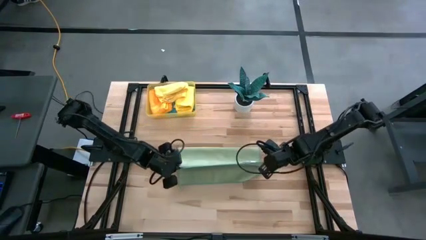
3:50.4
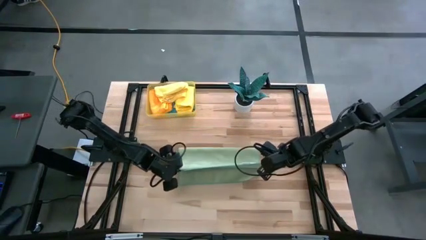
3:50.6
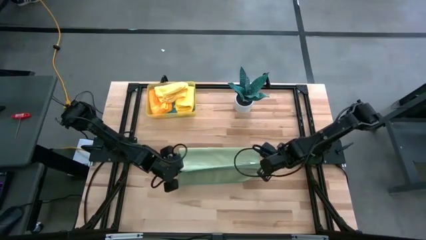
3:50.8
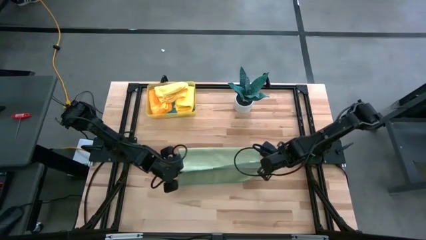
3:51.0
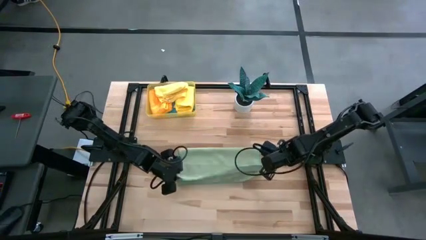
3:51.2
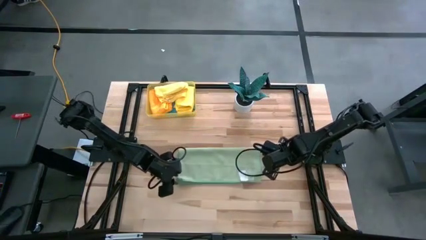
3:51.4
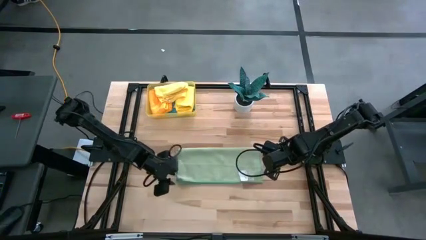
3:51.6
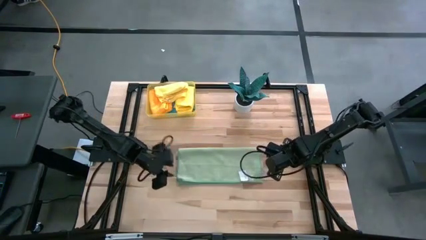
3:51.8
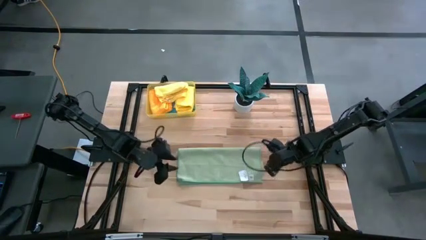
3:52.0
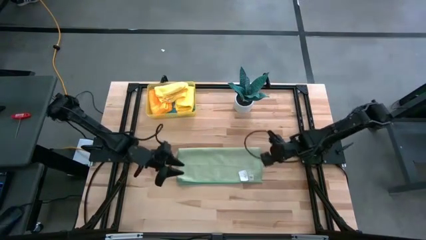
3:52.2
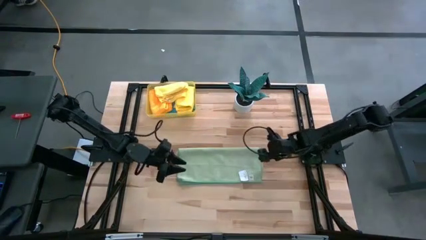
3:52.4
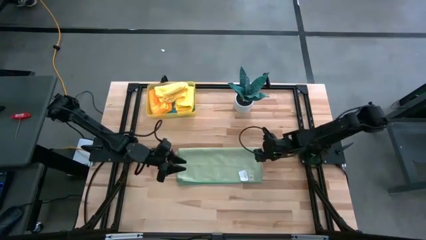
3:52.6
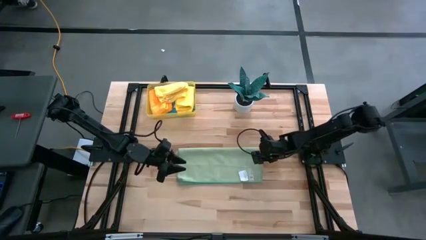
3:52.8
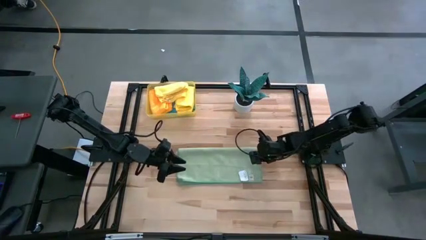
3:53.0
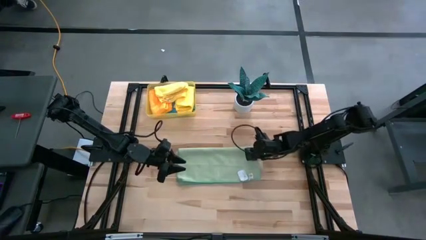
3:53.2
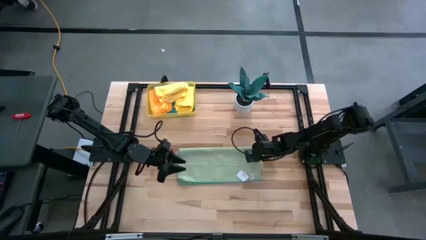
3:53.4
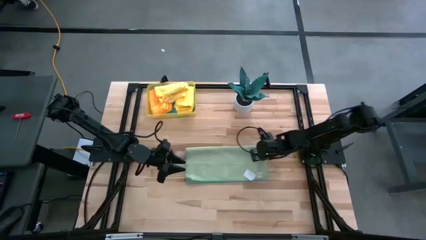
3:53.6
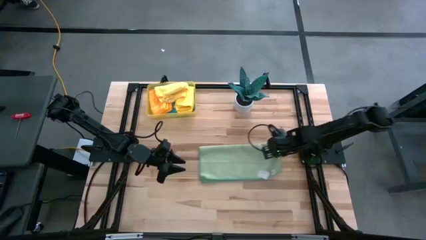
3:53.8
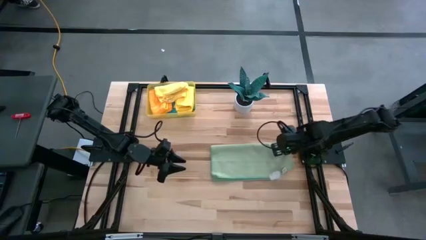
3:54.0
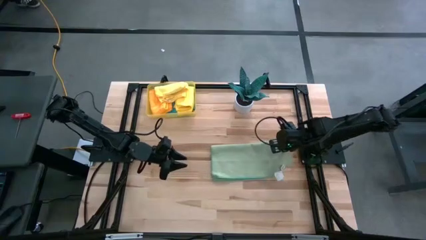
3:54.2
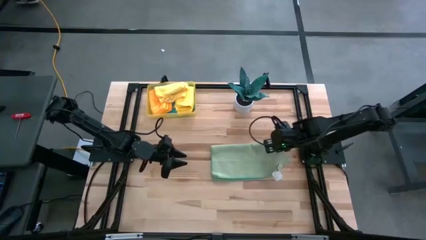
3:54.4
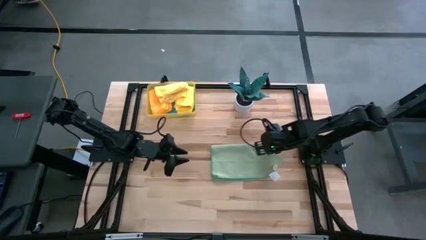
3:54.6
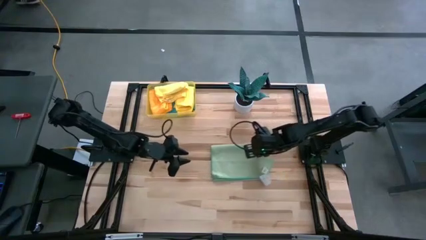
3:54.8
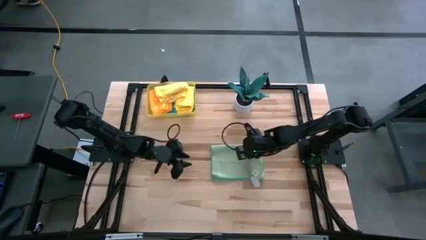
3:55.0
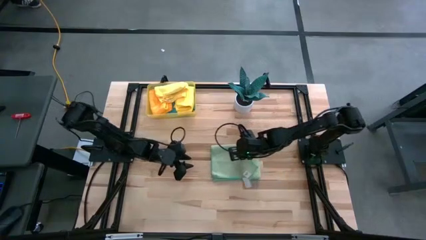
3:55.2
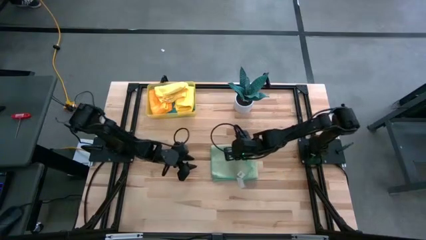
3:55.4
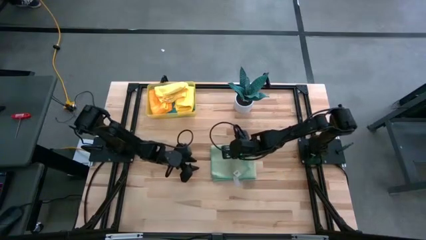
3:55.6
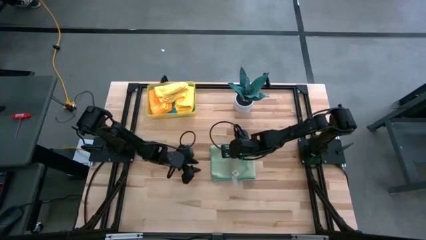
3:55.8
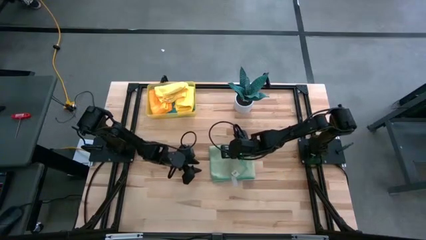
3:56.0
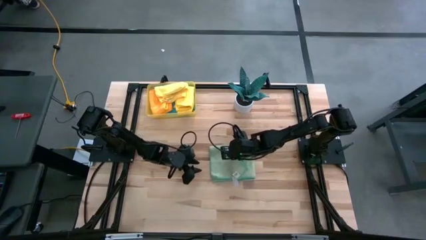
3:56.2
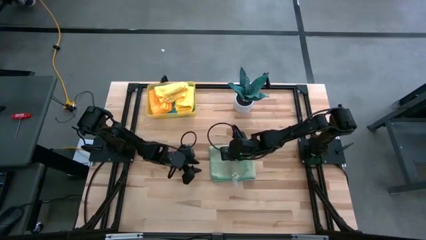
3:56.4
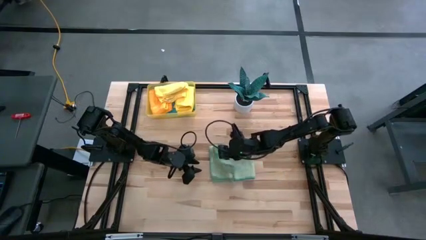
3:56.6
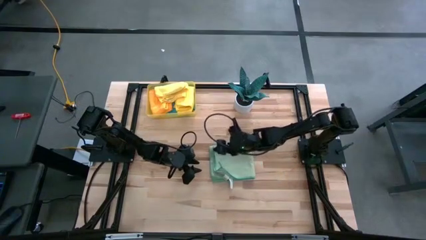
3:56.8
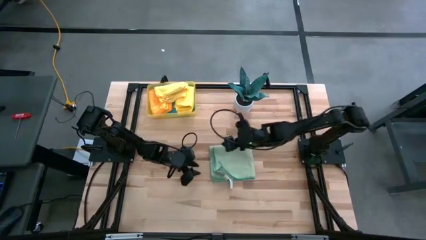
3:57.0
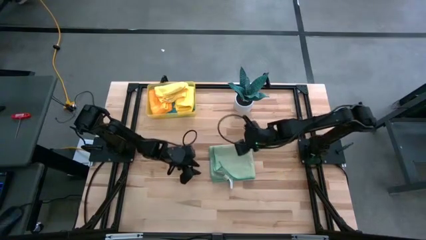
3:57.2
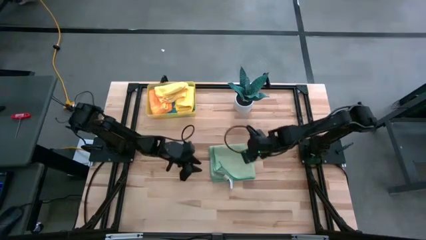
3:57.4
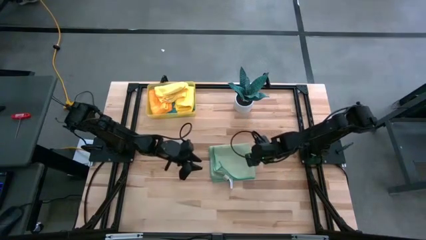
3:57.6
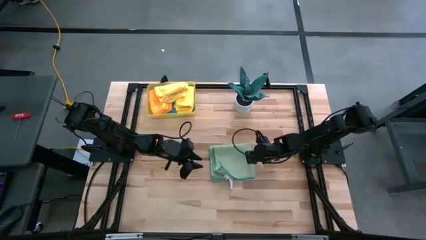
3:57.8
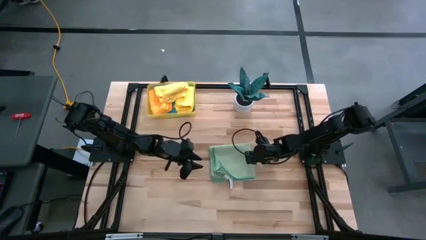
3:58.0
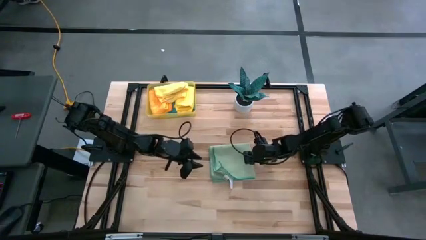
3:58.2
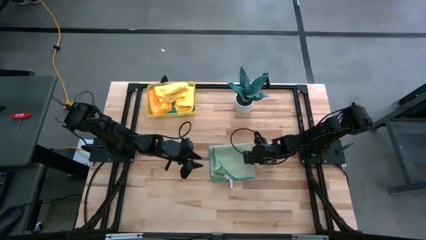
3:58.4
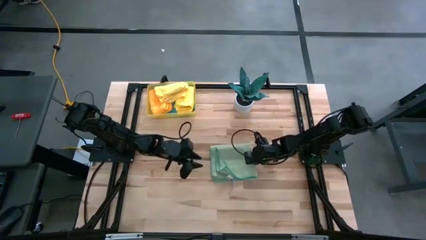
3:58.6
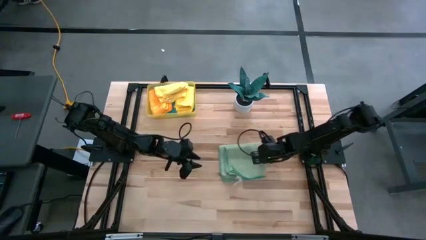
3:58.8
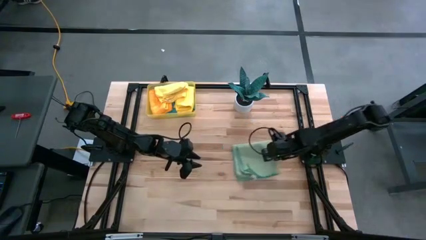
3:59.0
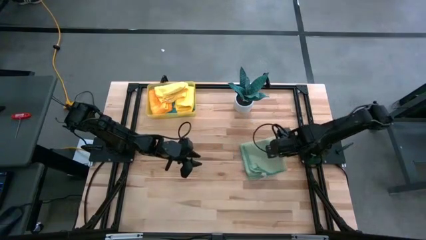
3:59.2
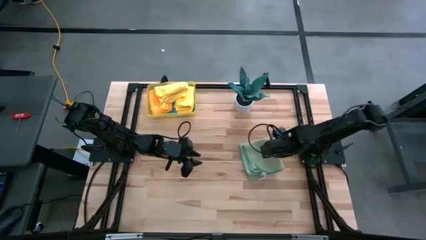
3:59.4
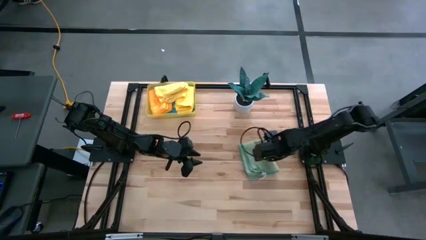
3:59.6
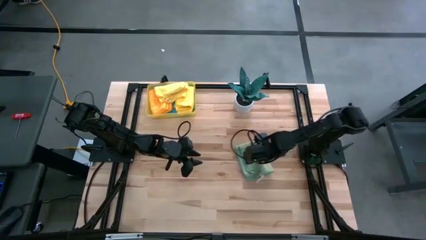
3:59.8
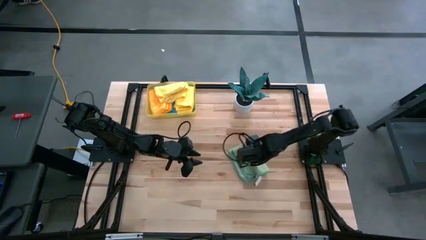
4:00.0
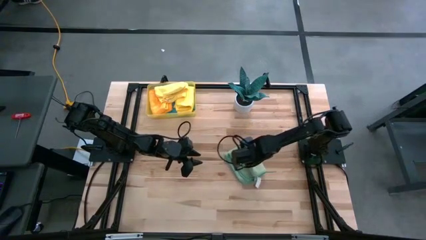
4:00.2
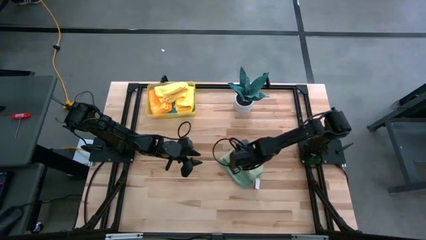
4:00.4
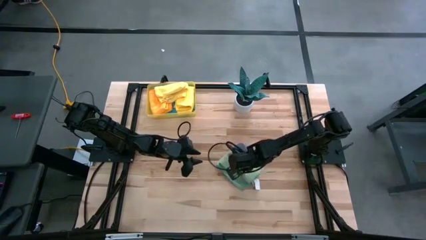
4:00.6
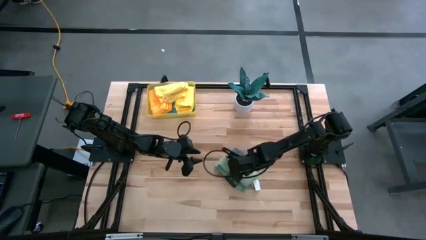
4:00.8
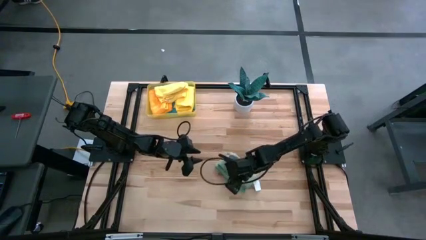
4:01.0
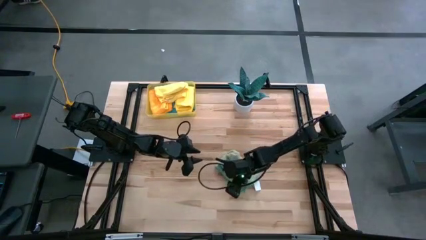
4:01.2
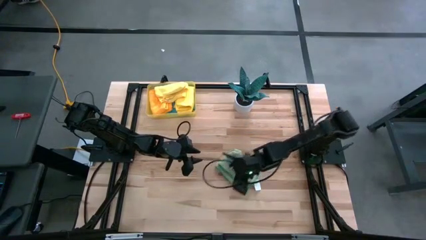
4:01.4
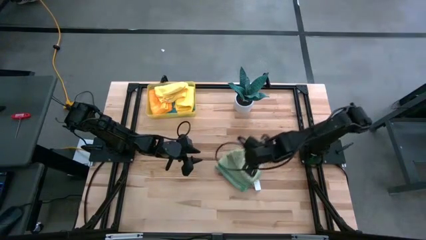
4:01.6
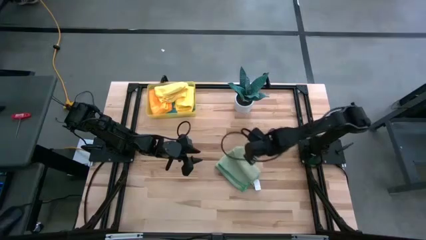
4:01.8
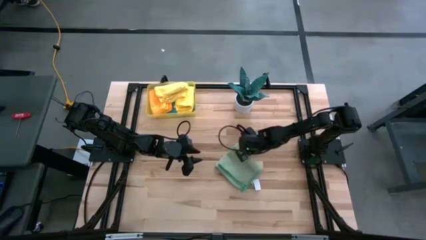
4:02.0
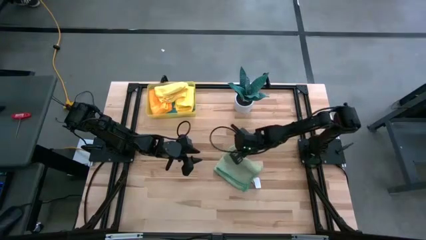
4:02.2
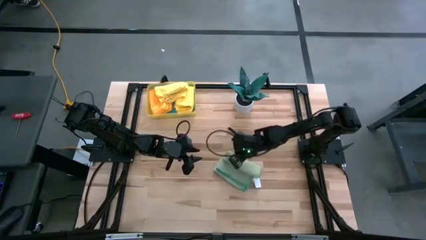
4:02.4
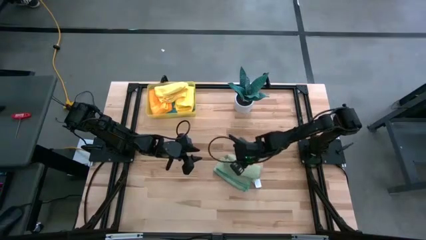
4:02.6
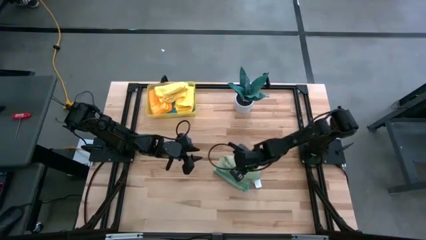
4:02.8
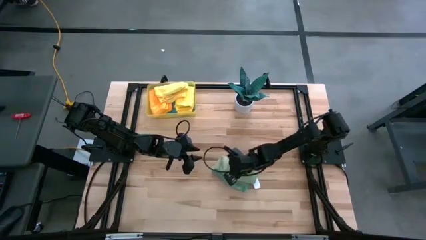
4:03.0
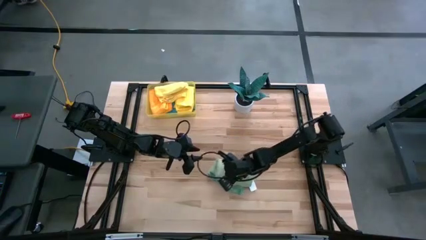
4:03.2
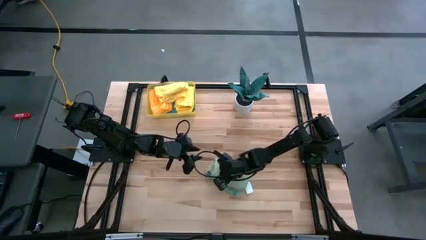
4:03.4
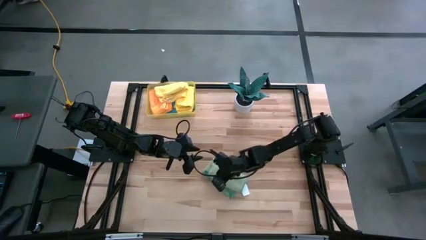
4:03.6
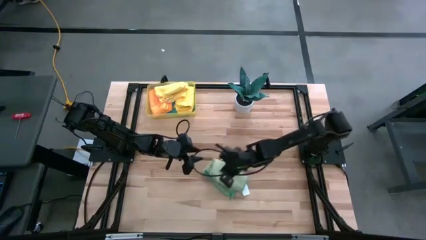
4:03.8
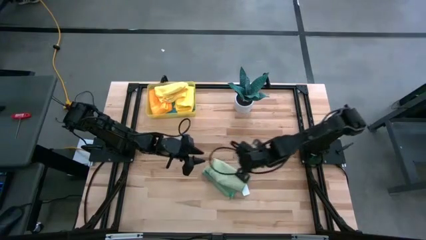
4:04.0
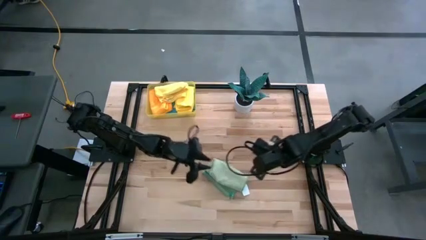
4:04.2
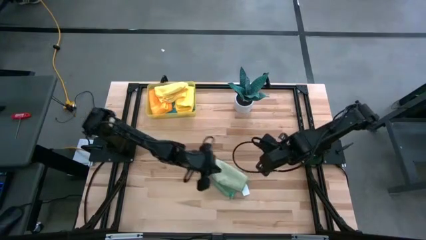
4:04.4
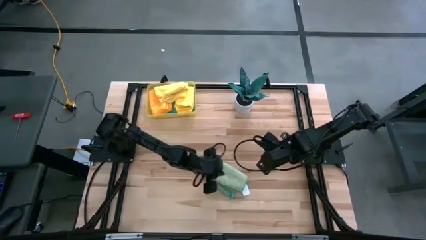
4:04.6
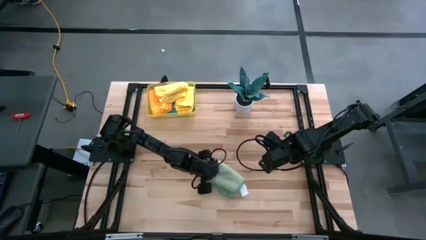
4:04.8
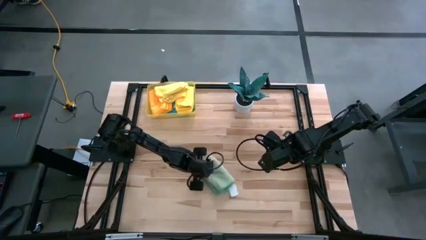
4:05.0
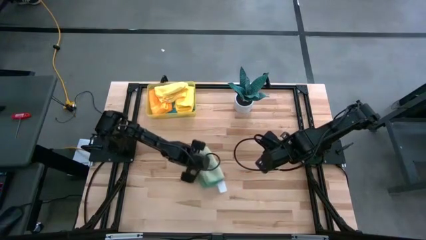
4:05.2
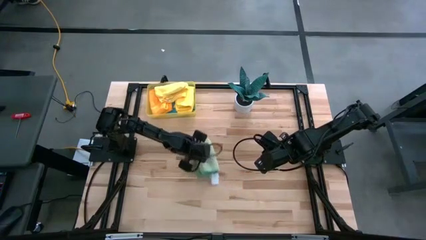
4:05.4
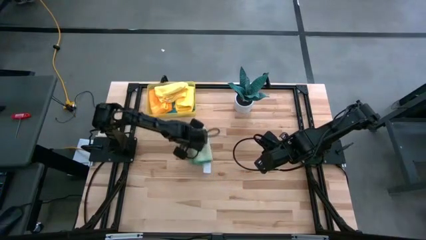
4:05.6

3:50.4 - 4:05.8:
Task: Fold microfiber towels
Fold the green microfiber cloth
